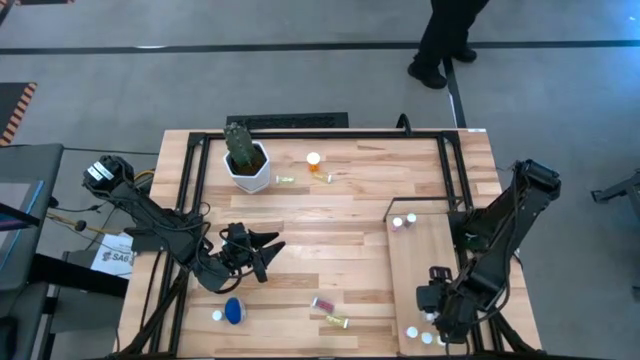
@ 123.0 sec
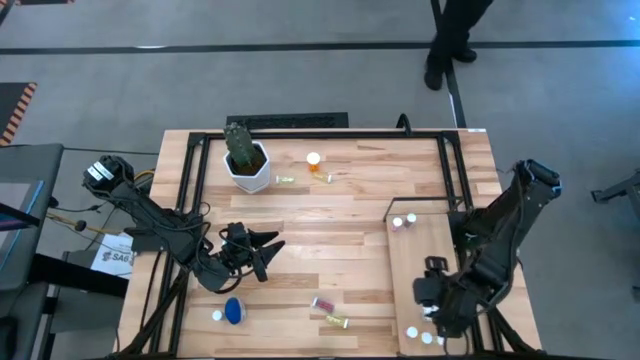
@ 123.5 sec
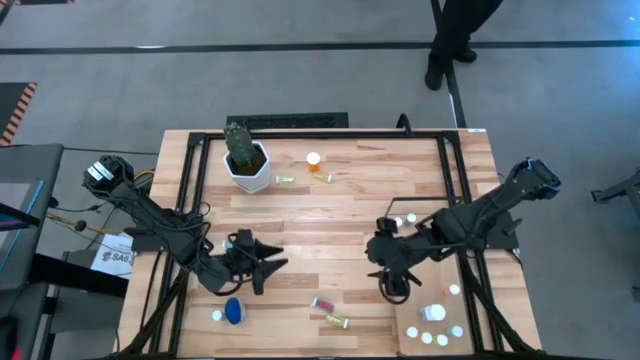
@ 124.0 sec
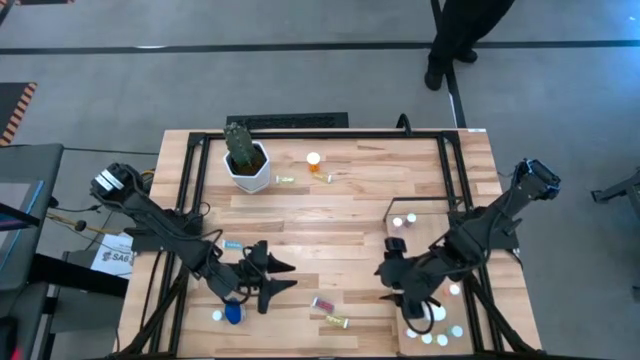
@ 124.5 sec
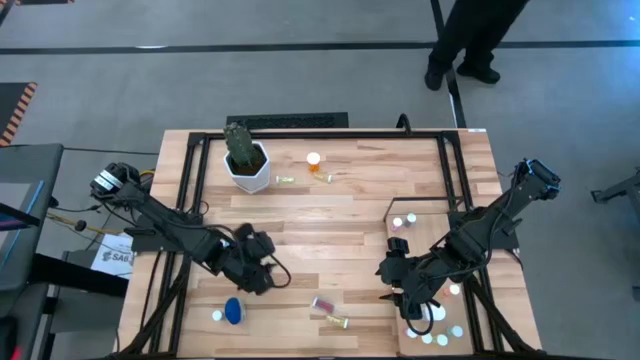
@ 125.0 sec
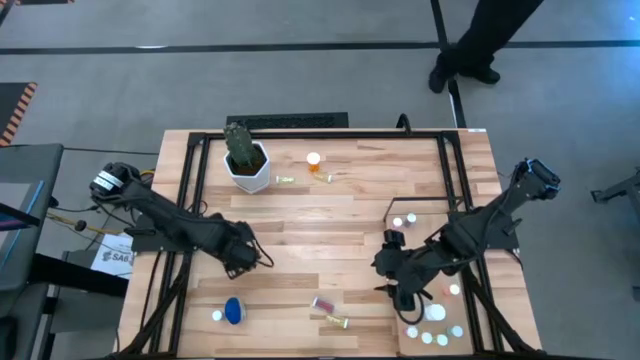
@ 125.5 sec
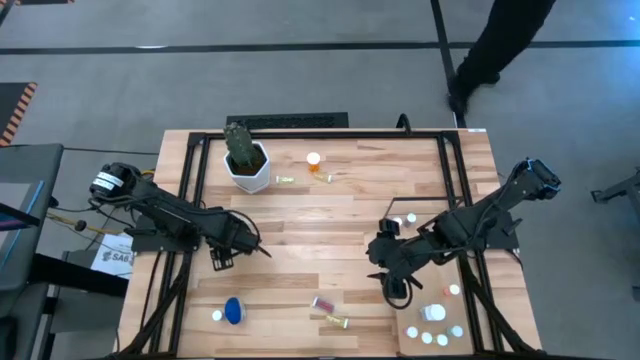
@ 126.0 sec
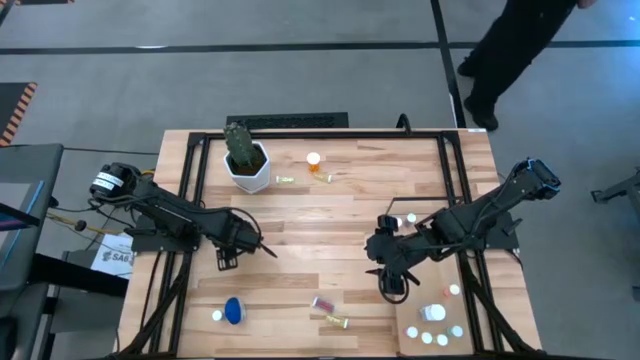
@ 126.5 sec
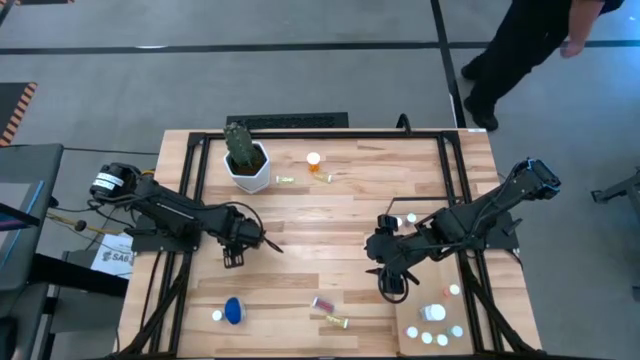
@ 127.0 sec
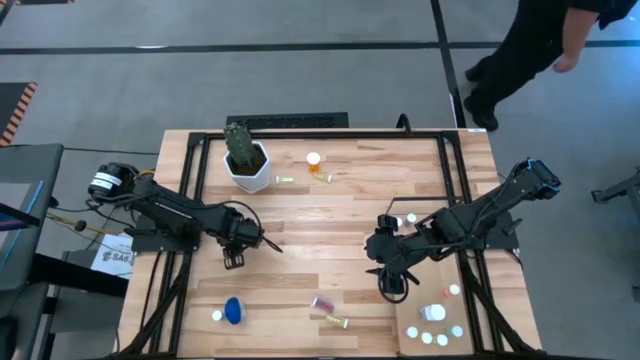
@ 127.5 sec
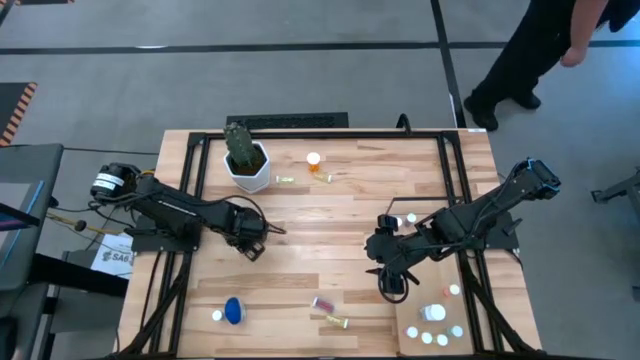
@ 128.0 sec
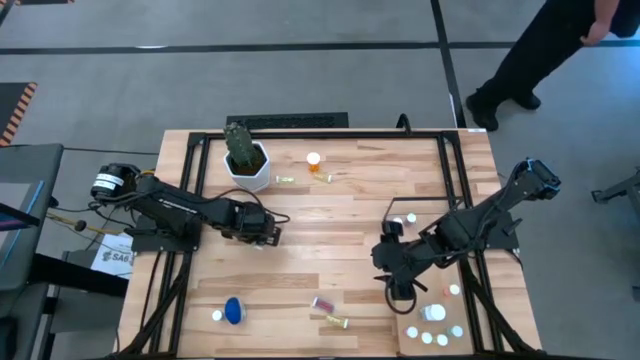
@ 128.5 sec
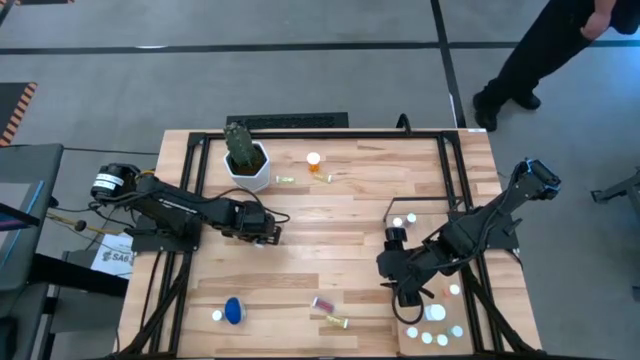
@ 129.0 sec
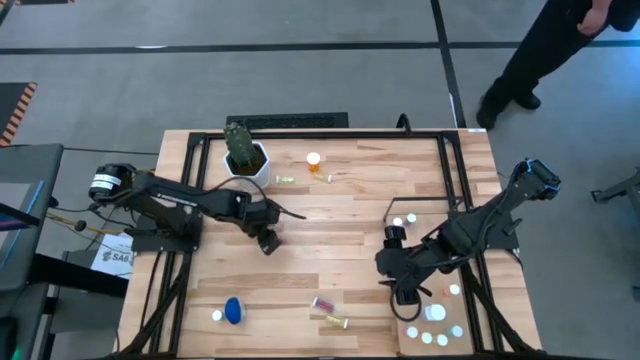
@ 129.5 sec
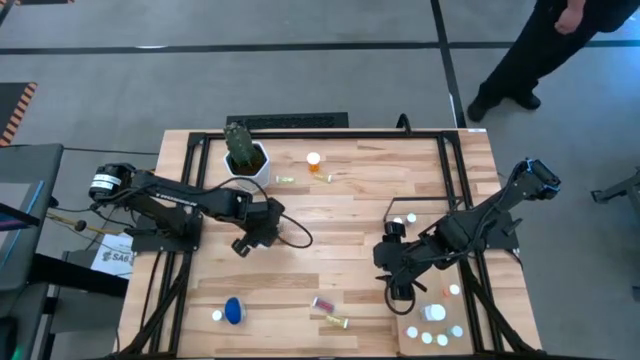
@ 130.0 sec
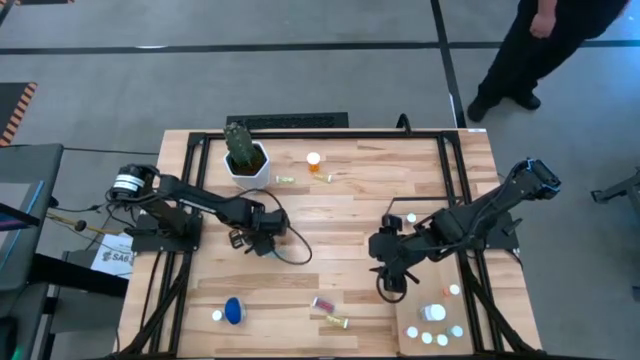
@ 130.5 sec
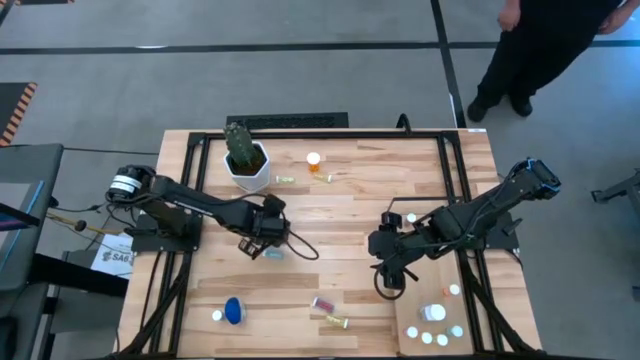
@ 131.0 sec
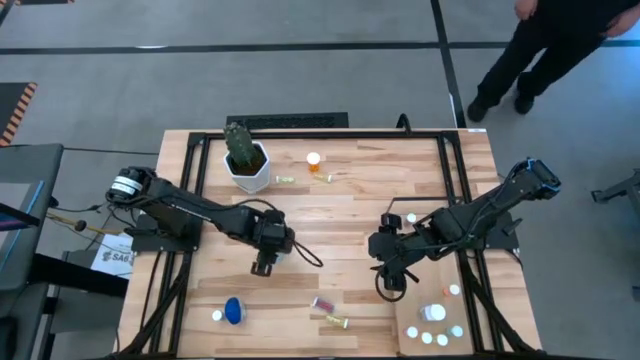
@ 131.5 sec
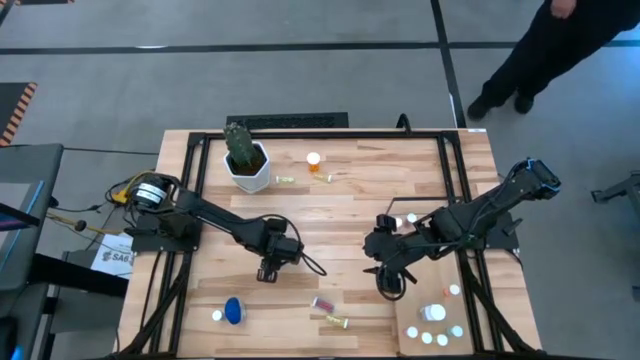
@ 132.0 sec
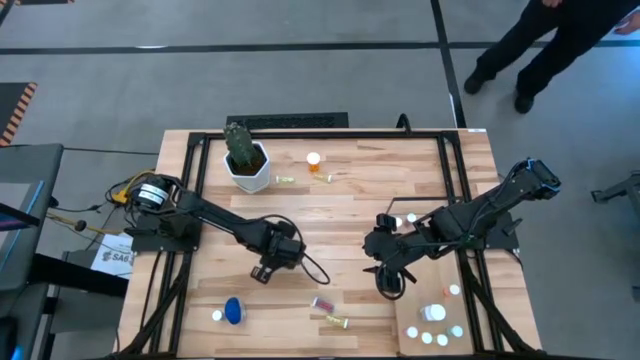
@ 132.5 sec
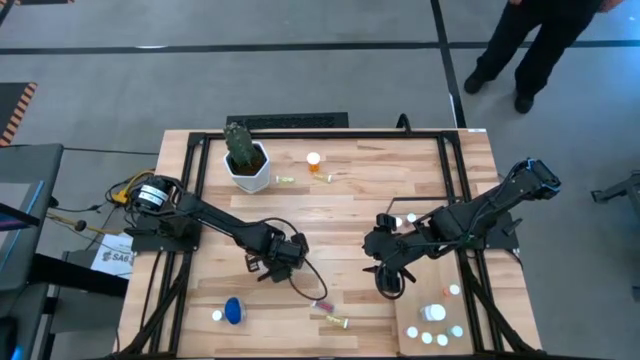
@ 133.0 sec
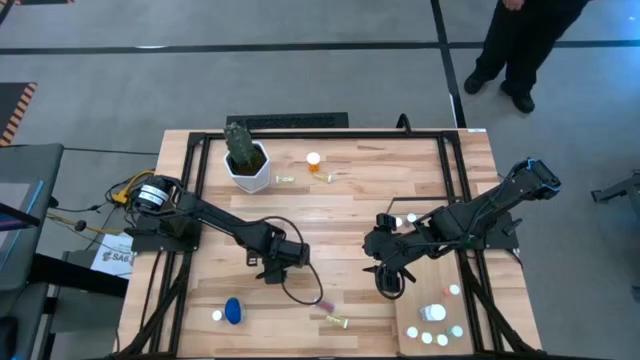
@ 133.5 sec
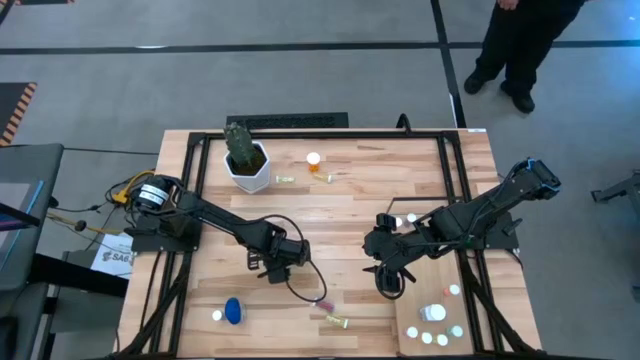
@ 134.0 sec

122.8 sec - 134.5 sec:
Task: Pick and place medicine bottles onto shelf by color
Put the blue pill bottle on the shelf

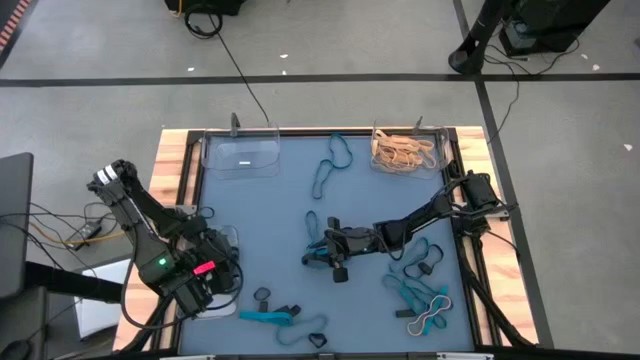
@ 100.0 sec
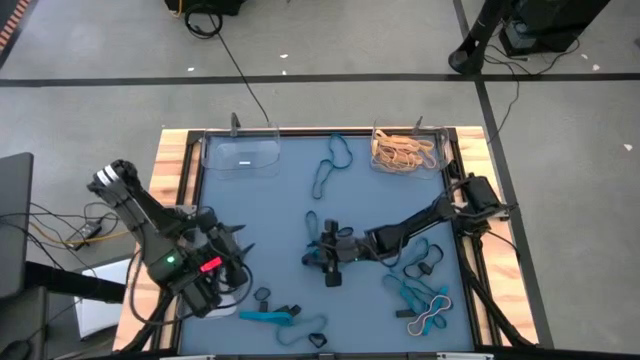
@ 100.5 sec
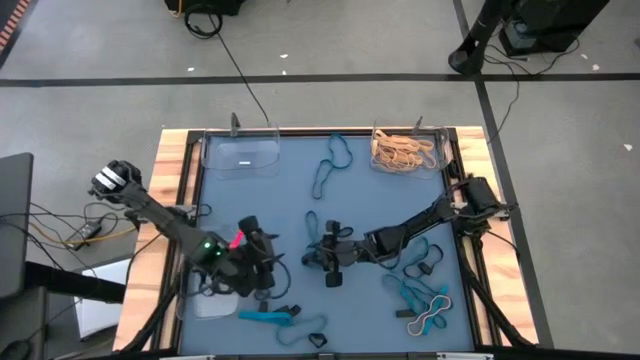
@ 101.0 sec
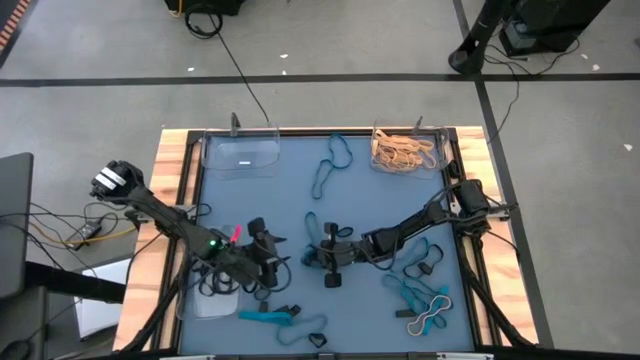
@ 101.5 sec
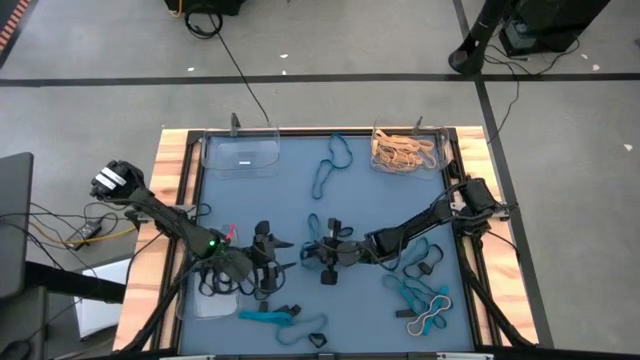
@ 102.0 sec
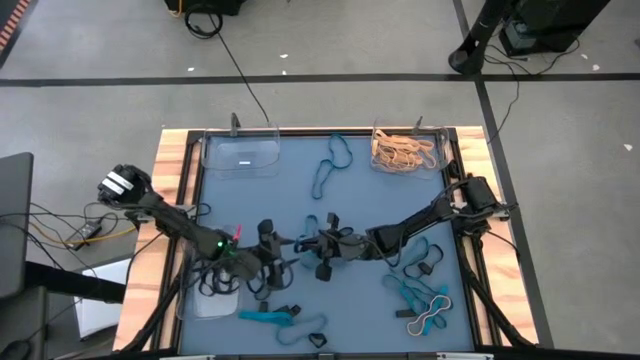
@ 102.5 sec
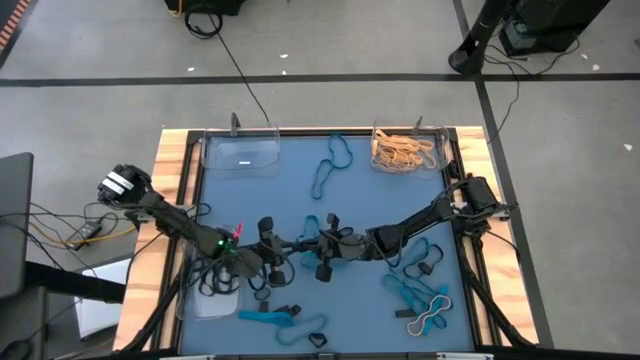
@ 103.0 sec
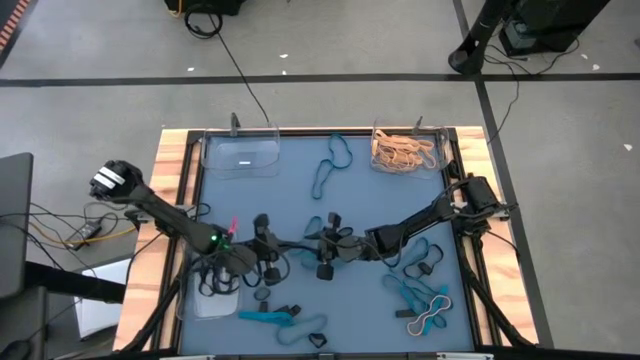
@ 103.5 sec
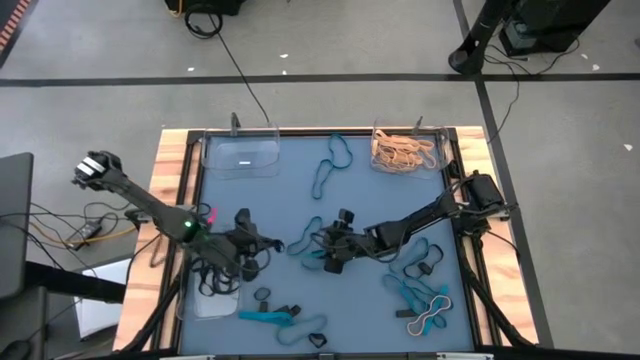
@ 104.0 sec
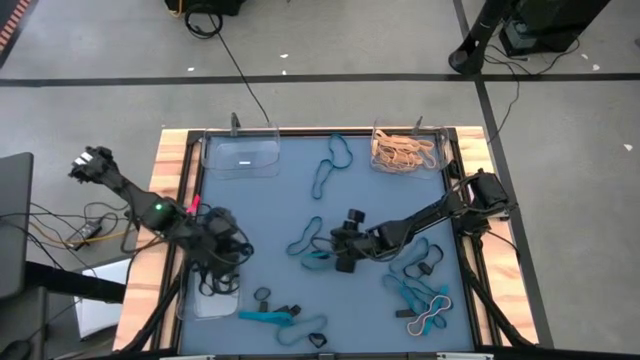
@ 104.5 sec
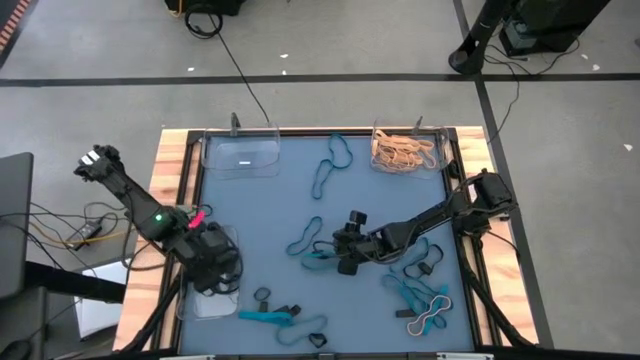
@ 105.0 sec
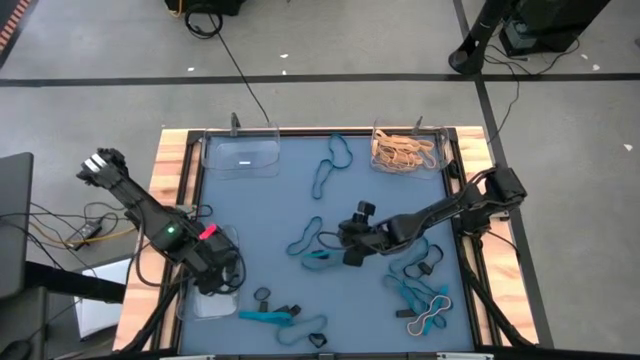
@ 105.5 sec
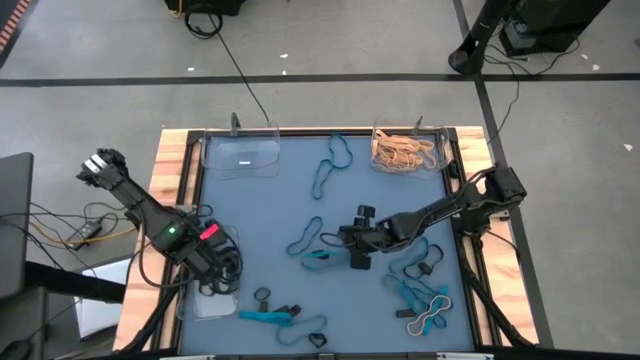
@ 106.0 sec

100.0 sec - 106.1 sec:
Task: Sort rubber bands into baskets
Put the small black rubber band into the bottom left transparent bin

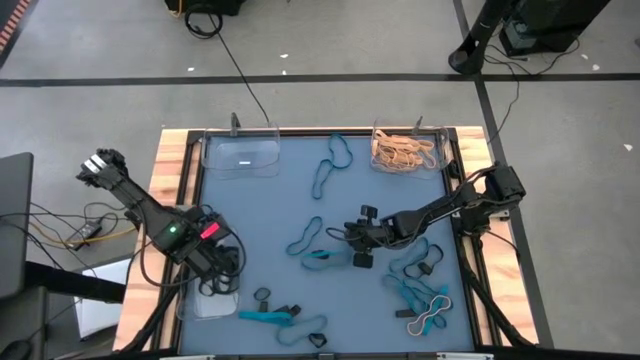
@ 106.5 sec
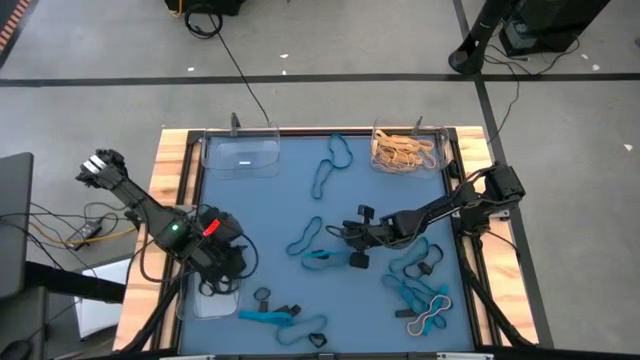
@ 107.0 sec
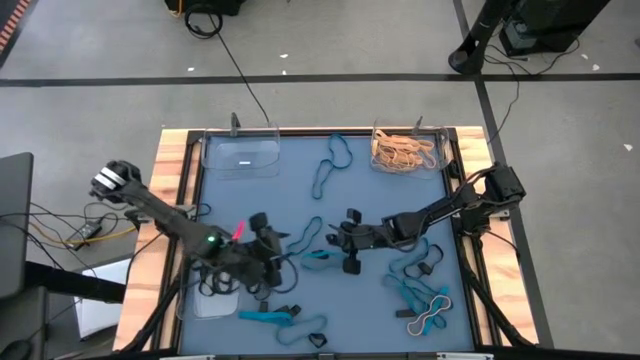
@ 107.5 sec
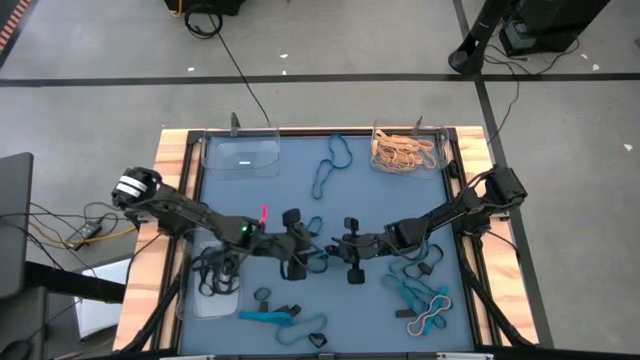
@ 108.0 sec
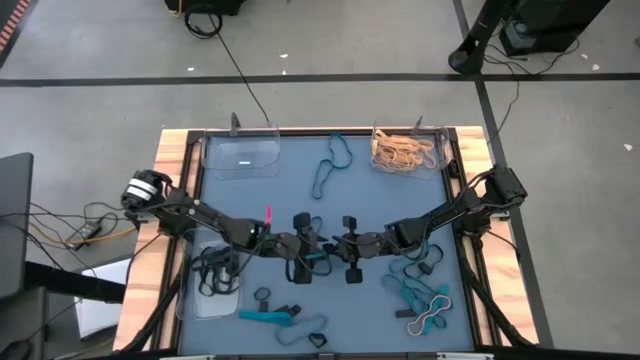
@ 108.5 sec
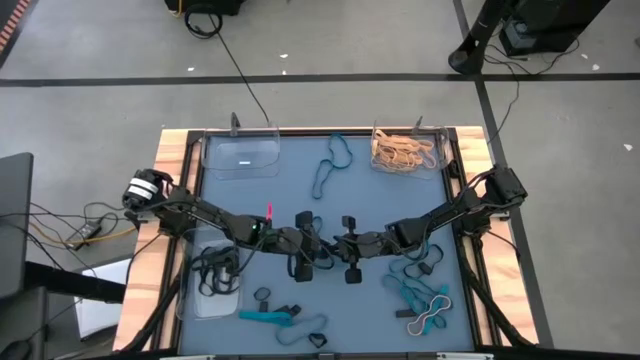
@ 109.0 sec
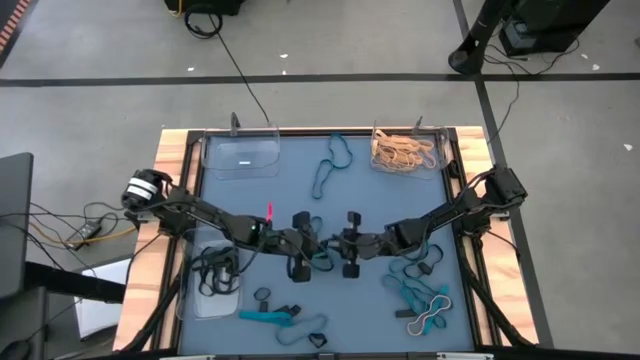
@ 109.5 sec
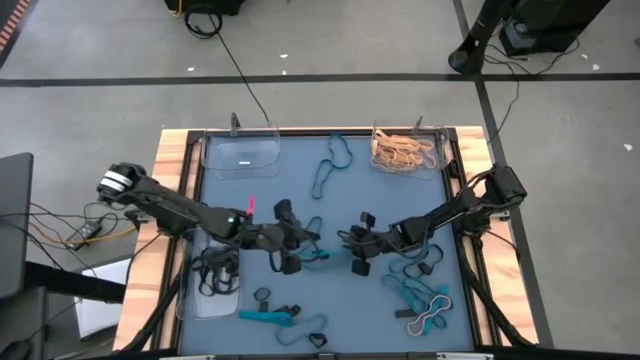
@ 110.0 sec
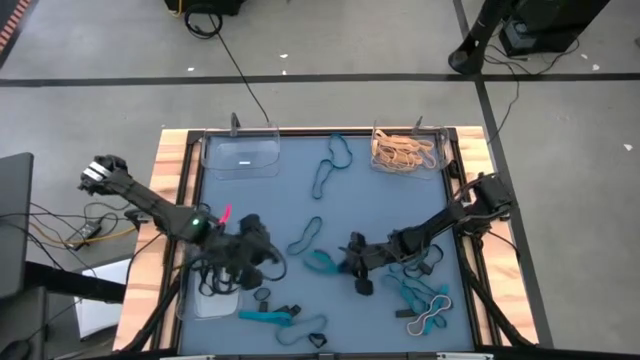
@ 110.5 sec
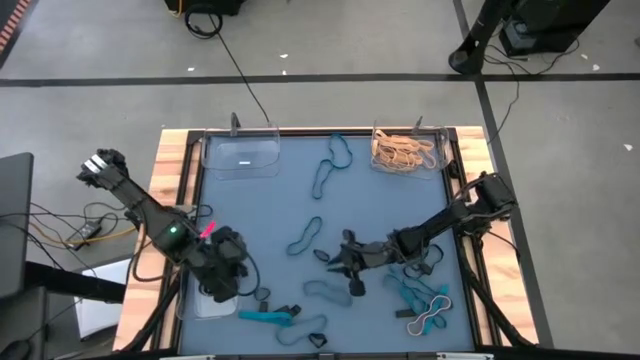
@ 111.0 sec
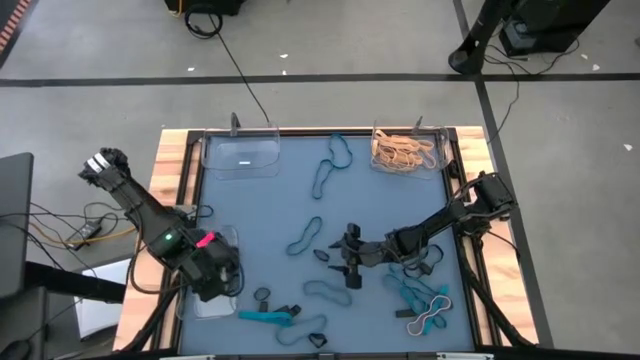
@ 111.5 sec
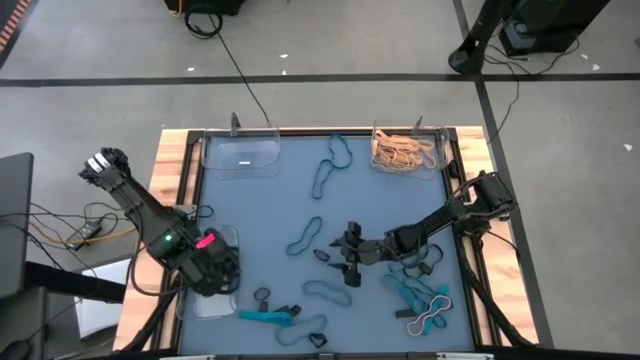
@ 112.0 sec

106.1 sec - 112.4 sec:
Put the small black rubber band into the bottom left transparent bin
